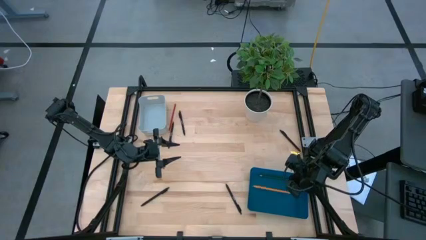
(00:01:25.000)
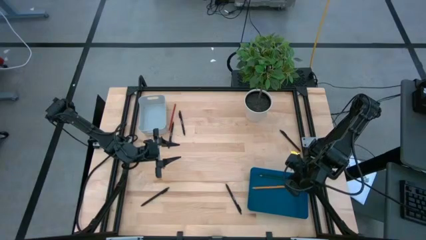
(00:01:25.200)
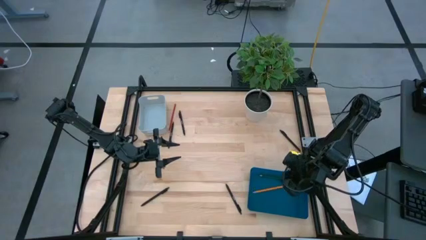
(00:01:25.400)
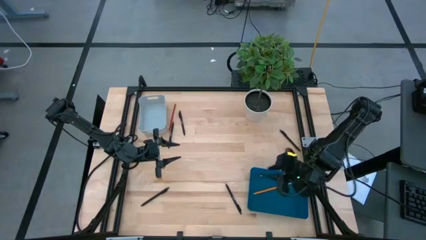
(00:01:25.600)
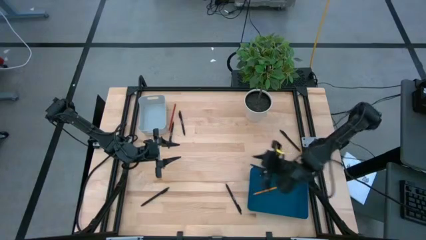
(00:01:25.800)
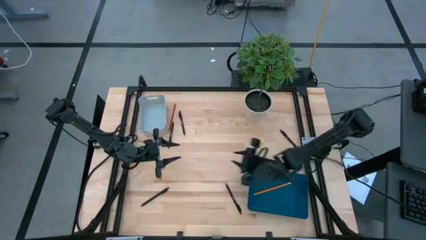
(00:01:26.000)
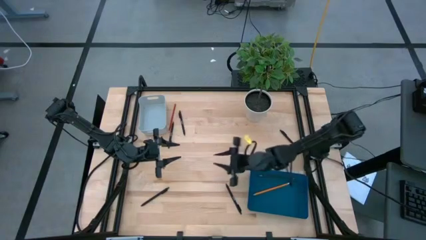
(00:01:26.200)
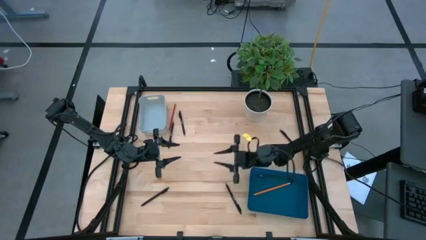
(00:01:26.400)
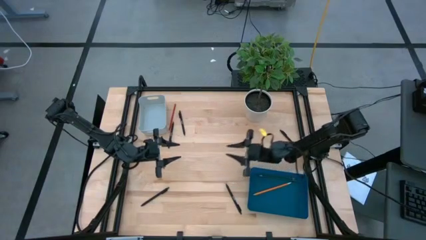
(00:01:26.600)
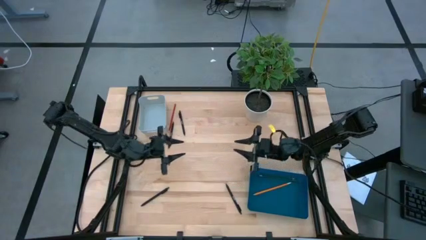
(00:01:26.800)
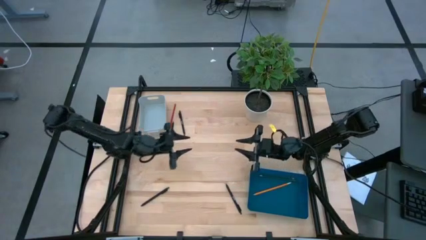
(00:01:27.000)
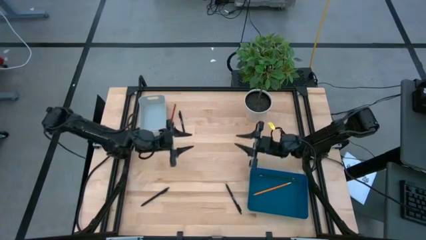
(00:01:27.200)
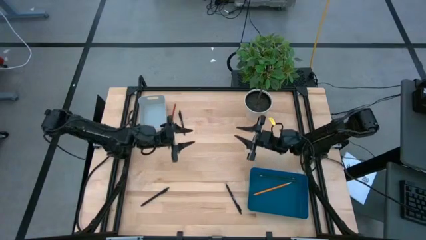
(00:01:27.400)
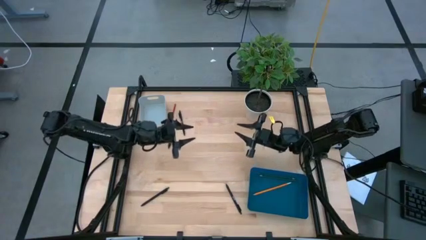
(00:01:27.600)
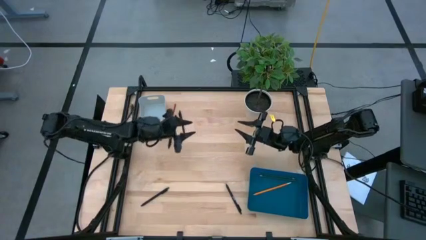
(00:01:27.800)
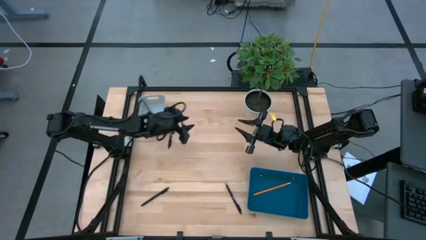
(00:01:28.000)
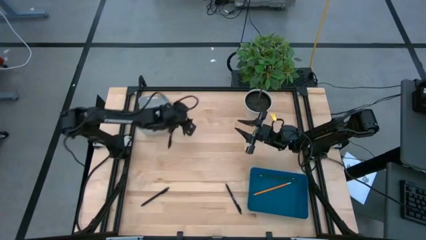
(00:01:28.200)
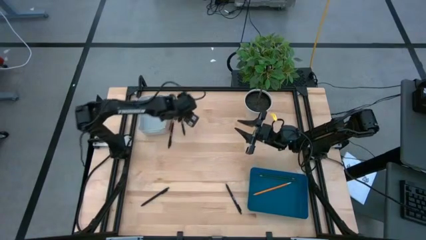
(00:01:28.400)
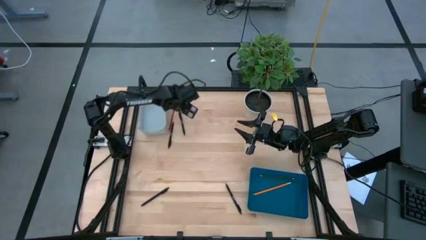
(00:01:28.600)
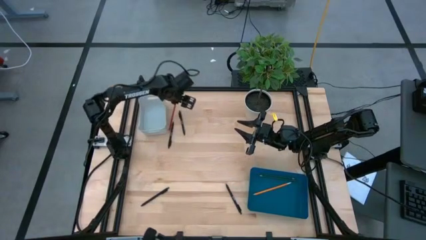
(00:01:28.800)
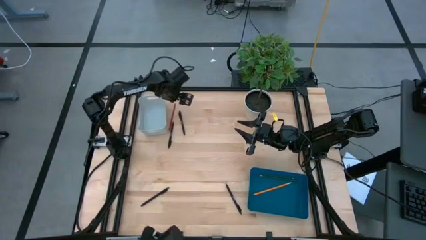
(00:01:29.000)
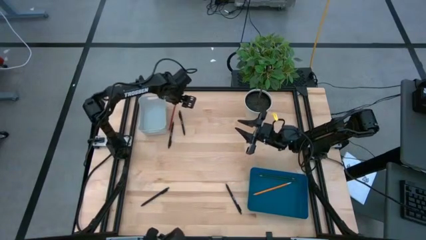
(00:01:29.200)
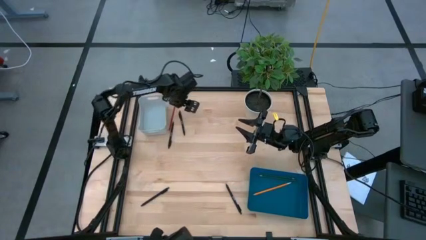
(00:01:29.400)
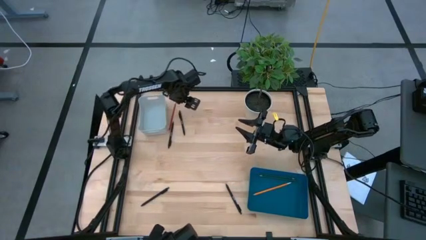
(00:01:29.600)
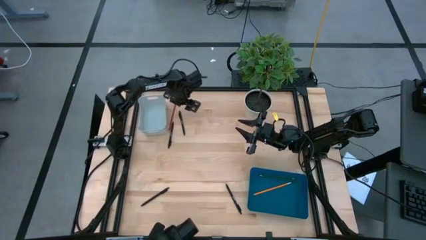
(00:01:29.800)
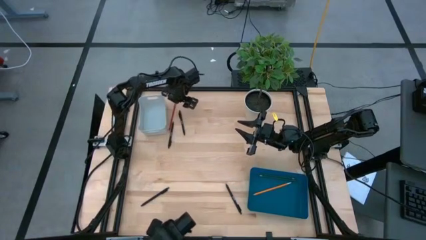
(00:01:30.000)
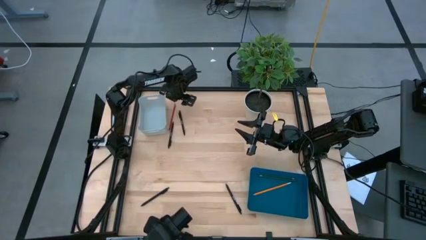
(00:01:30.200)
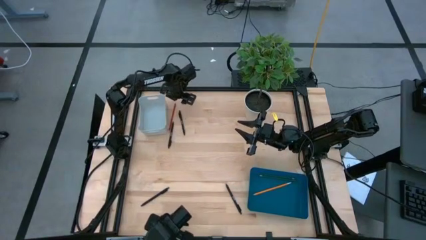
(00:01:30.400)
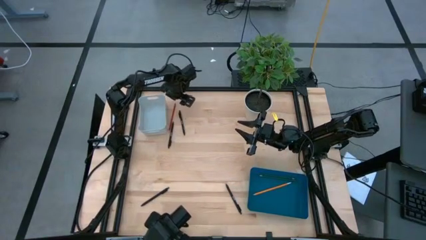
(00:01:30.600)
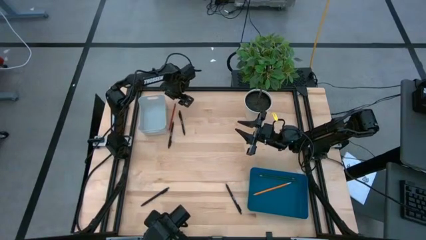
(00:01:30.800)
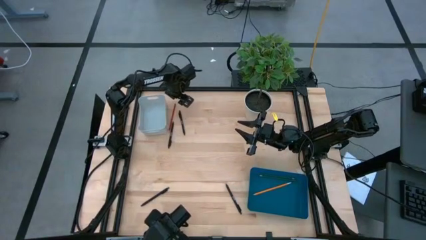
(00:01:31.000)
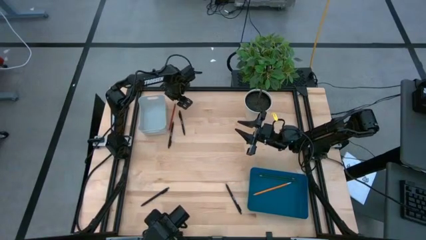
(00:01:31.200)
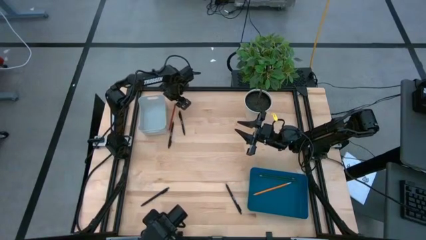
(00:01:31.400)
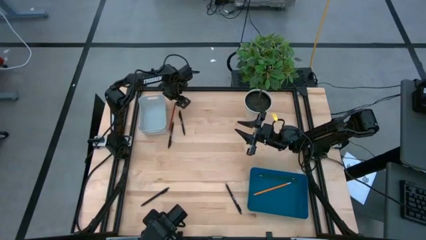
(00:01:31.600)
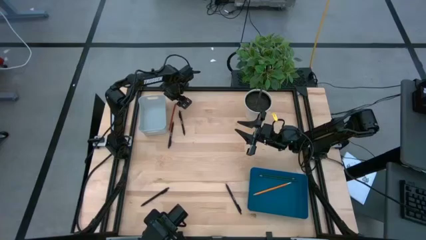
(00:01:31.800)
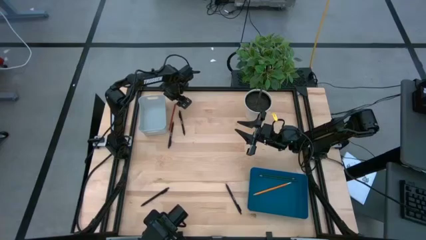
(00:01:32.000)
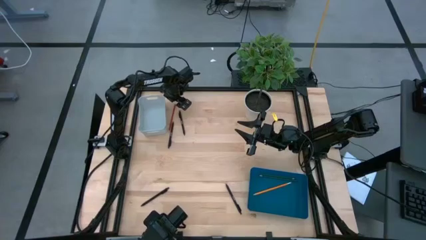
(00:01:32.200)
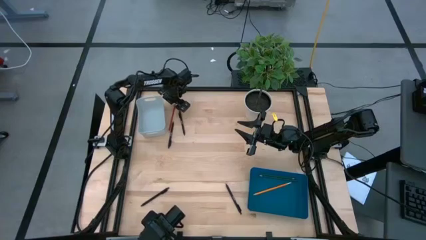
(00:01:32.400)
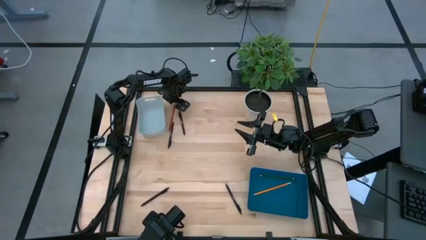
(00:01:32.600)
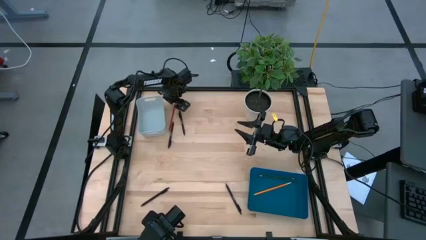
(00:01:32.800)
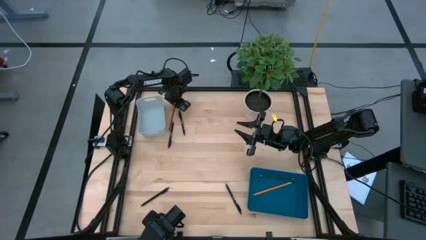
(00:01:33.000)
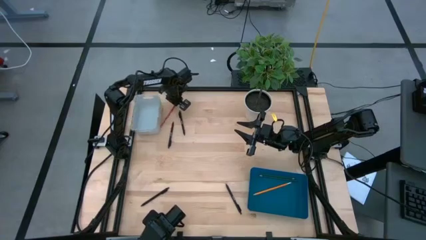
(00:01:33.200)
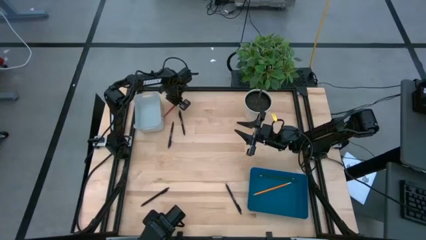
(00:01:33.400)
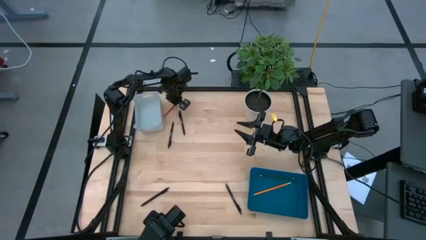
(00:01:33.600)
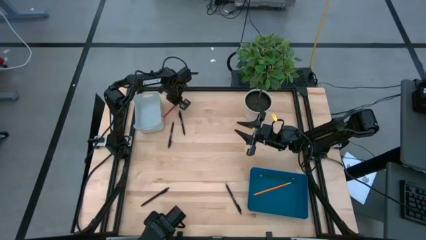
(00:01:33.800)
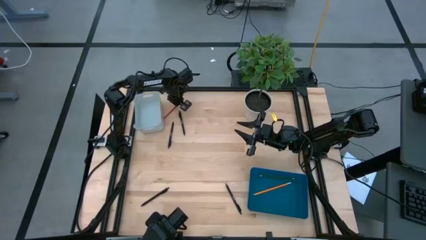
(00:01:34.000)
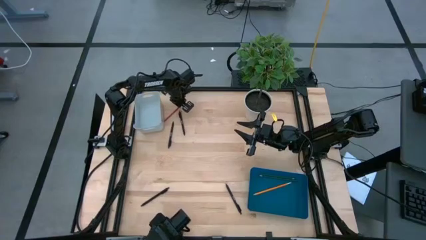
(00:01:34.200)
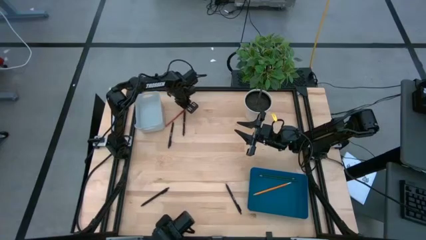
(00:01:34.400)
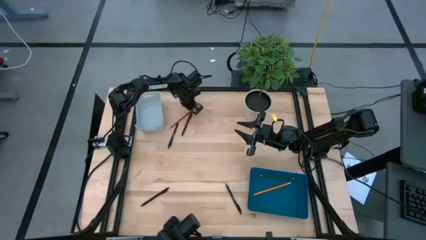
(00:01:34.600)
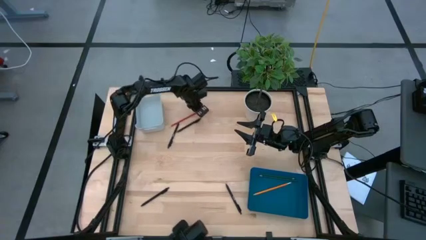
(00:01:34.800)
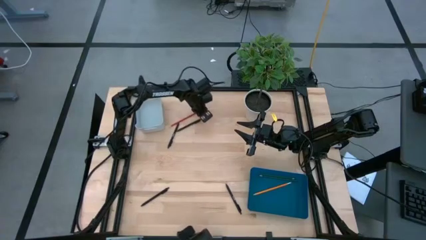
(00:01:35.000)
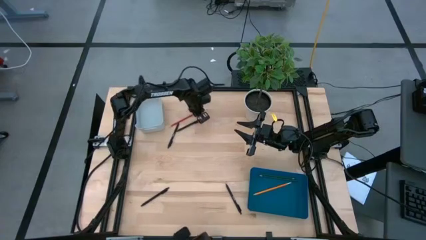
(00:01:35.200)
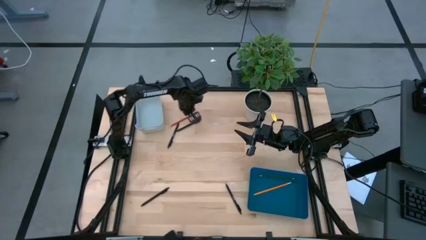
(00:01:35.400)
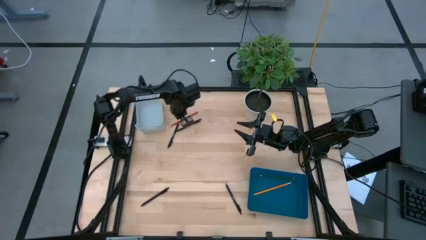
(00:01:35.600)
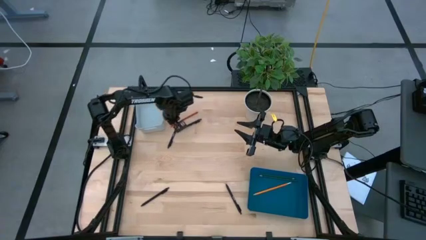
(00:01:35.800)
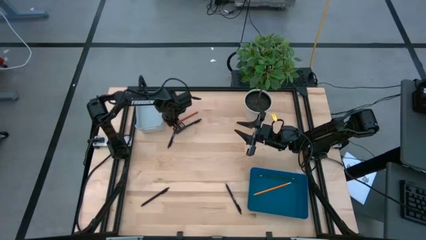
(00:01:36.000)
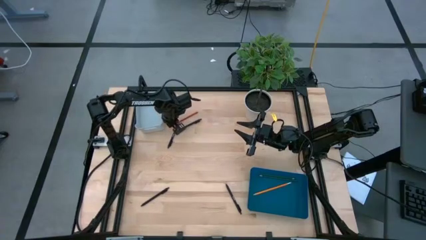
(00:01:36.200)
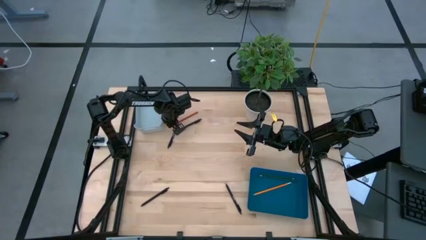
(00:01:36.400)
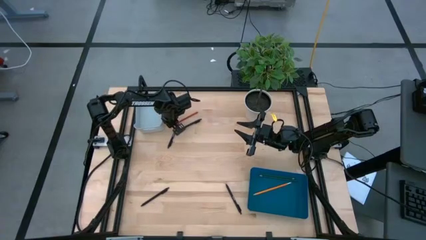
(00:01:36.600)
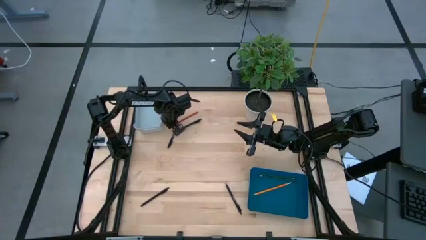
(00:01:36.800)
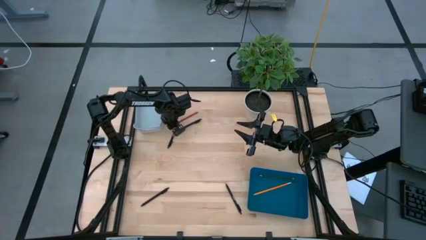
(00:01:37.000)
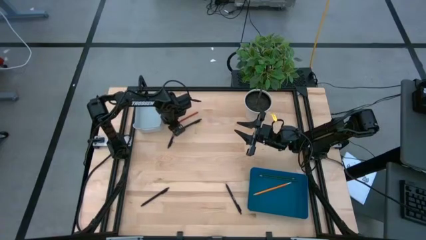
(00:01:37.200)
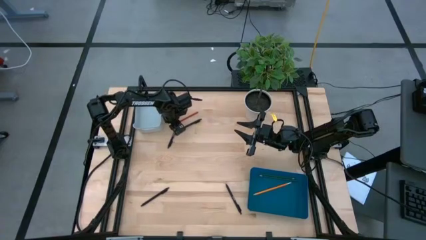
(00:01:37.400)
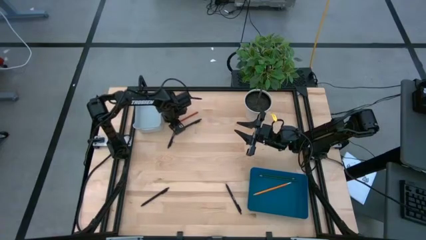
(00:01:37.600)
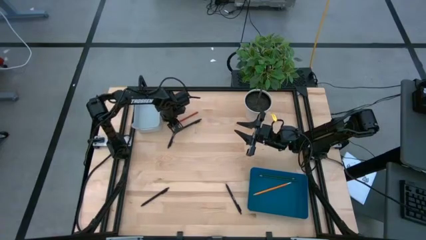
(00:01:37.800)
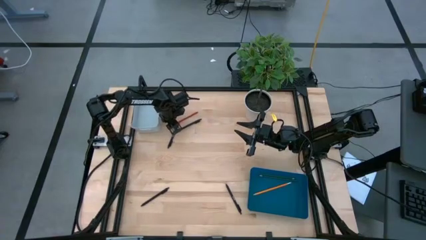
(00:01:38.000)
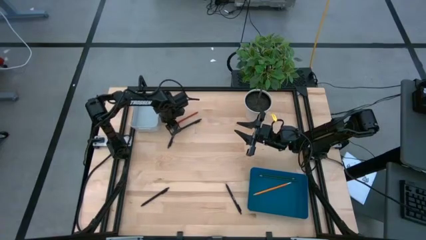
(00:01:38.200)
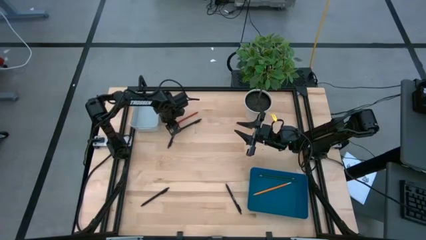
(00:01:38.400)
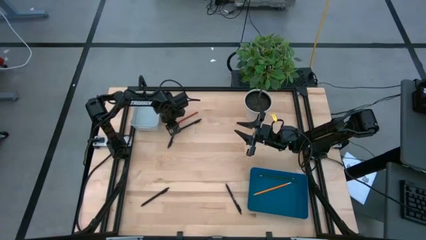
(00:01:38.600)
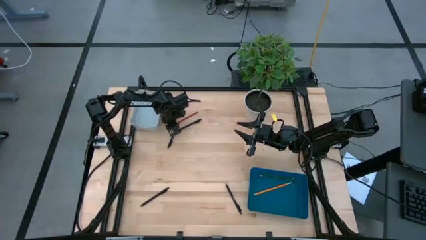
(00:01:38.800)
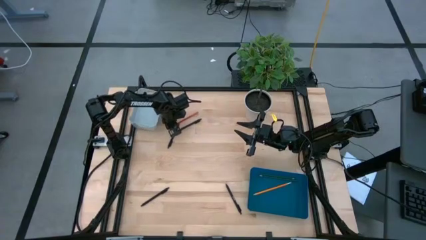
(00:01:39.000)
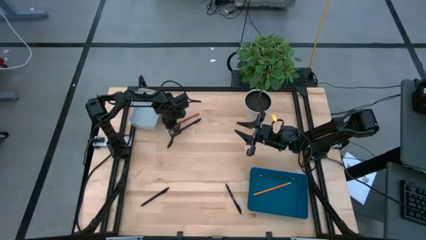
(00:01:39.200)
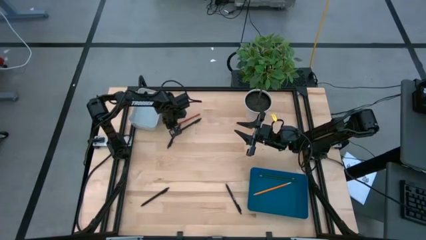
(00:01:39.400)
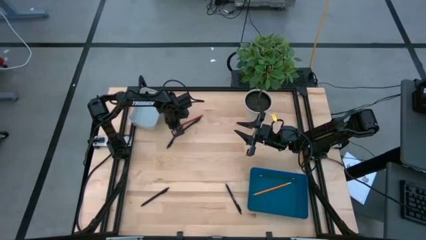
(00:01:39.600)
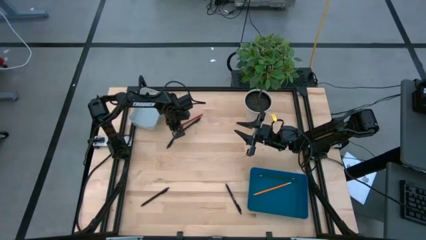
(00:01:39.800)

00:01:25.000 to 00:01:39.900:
Task: Sort pens & pencils
Put the red pencil into the blue bin
